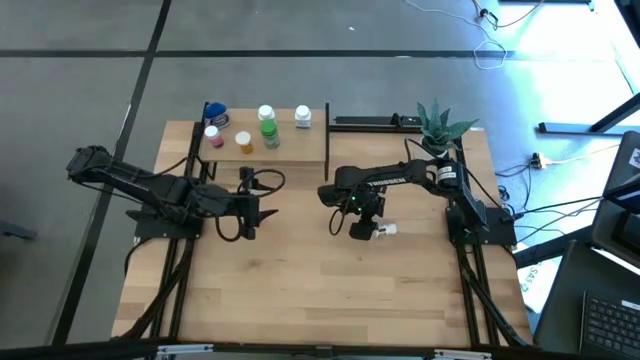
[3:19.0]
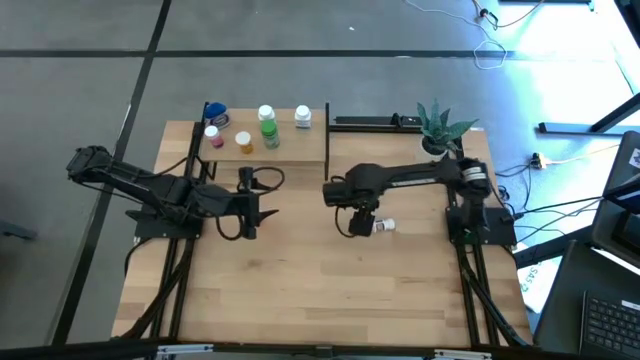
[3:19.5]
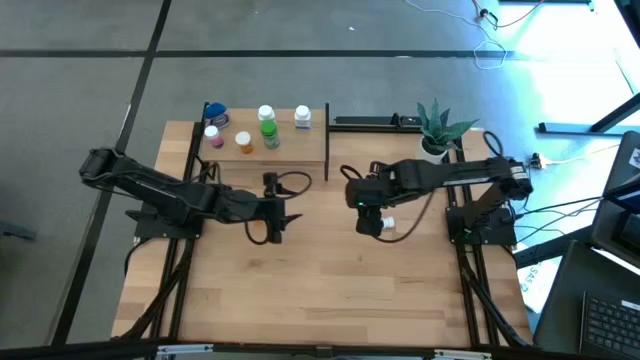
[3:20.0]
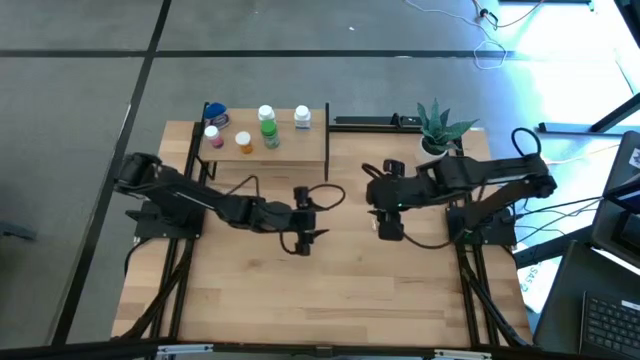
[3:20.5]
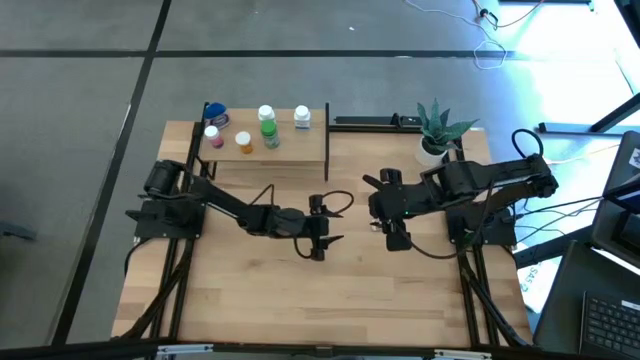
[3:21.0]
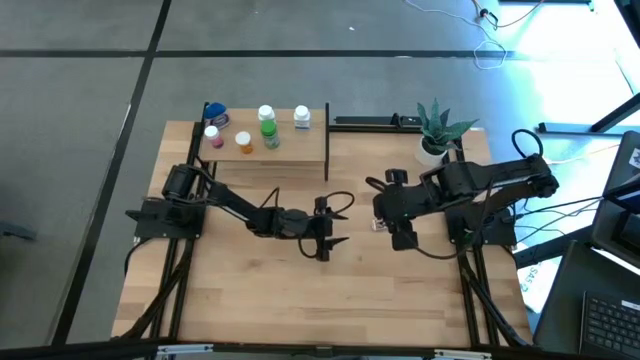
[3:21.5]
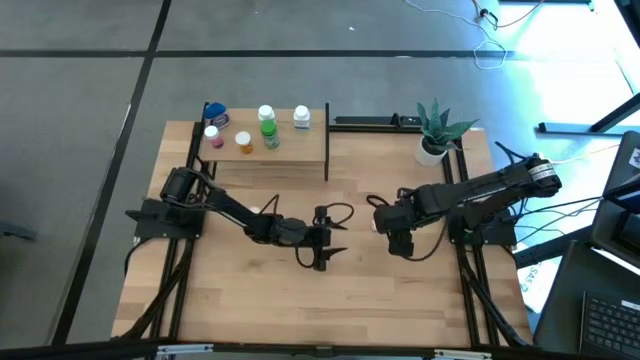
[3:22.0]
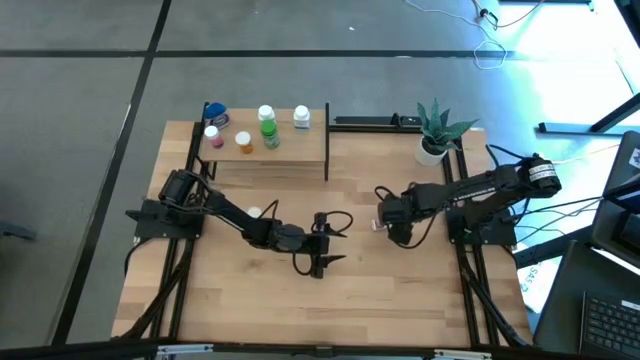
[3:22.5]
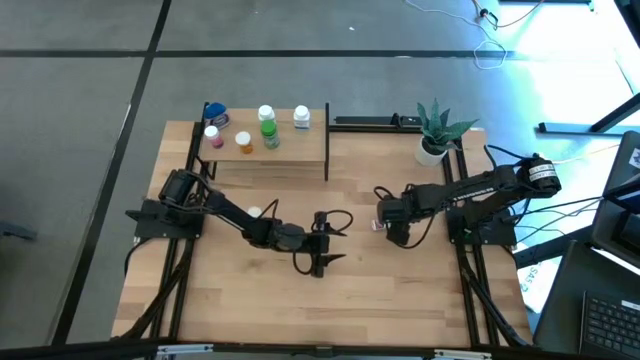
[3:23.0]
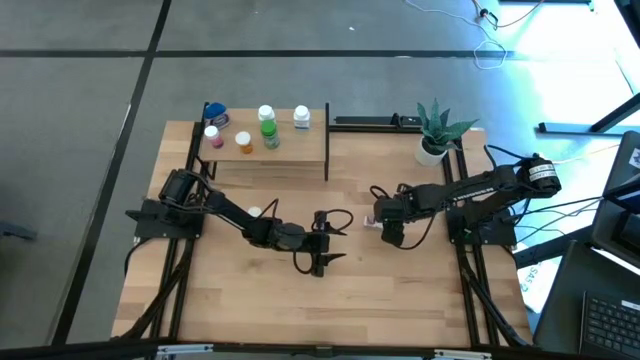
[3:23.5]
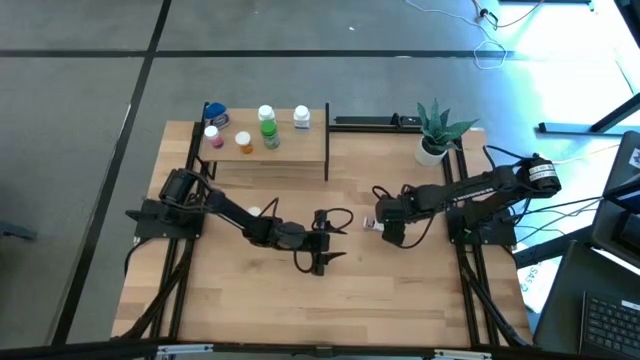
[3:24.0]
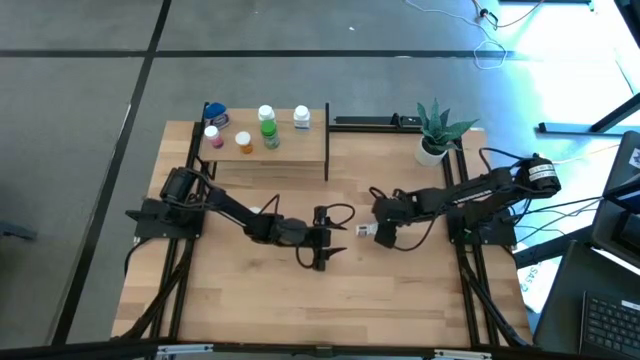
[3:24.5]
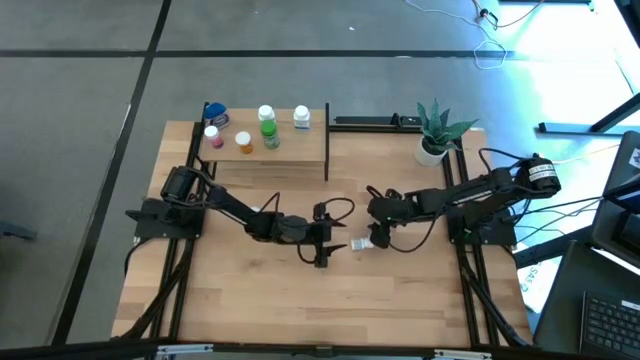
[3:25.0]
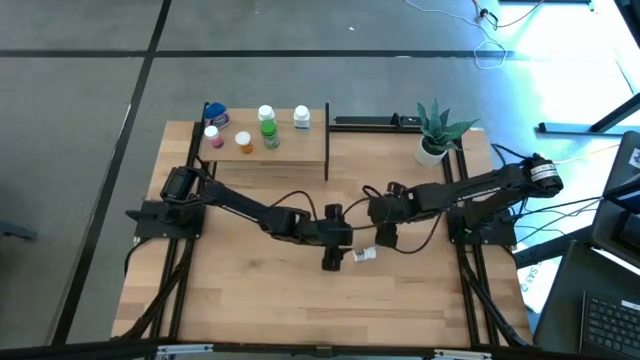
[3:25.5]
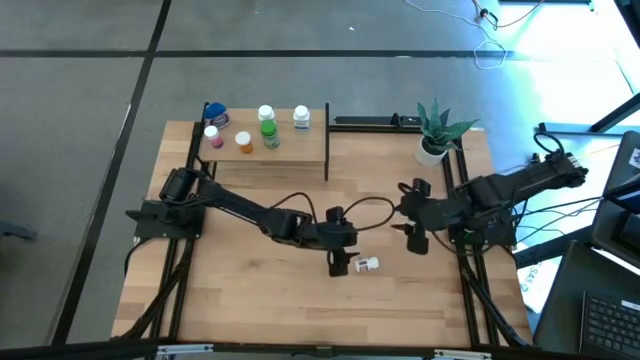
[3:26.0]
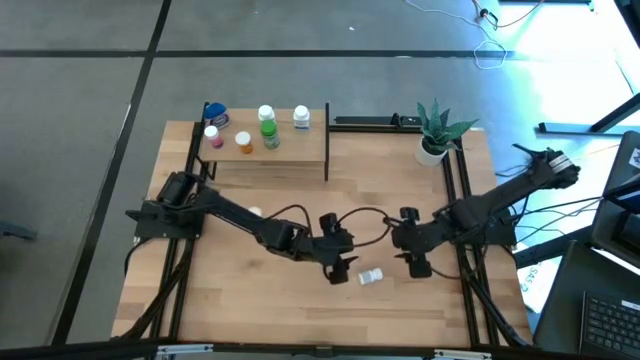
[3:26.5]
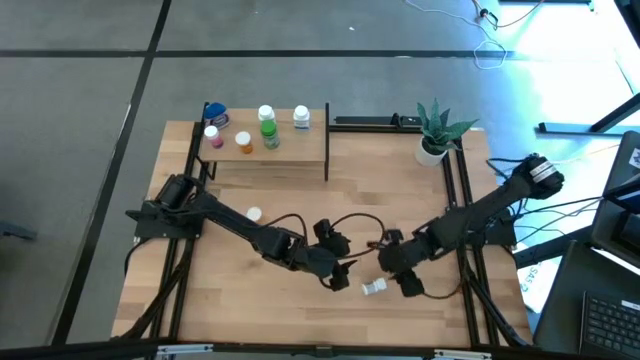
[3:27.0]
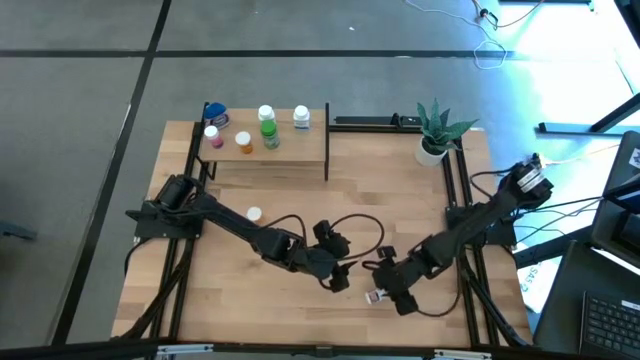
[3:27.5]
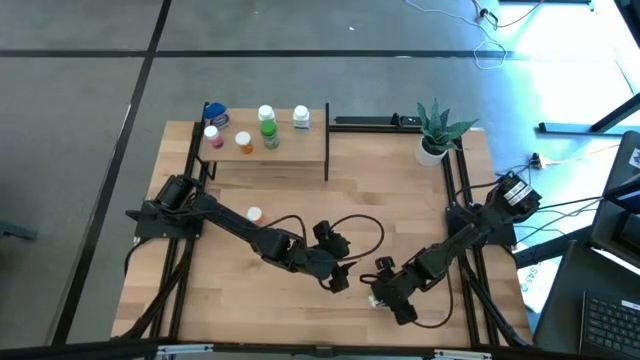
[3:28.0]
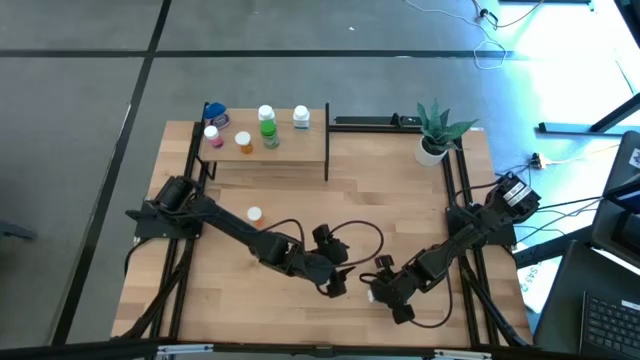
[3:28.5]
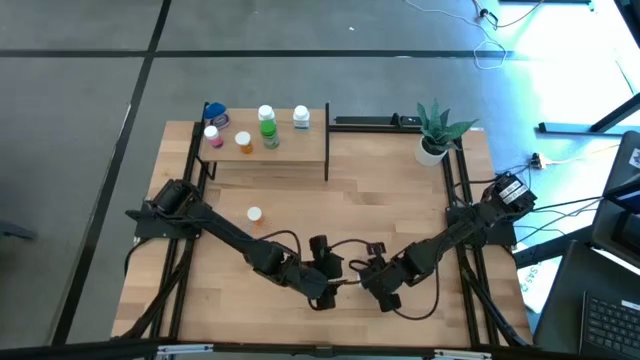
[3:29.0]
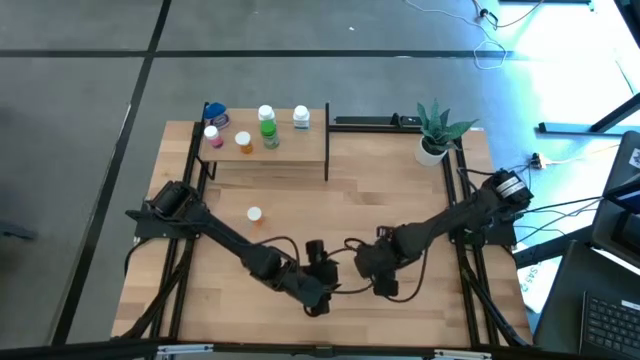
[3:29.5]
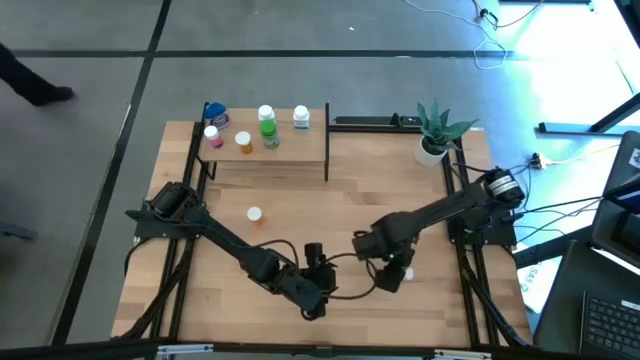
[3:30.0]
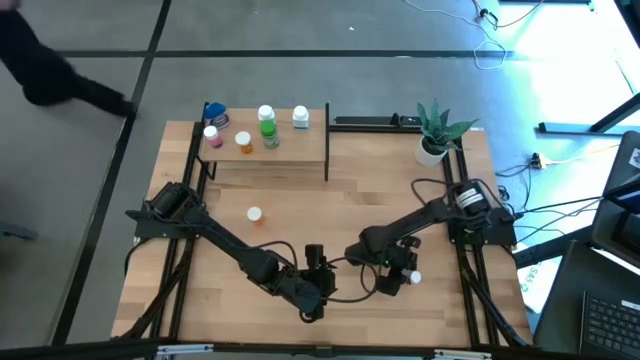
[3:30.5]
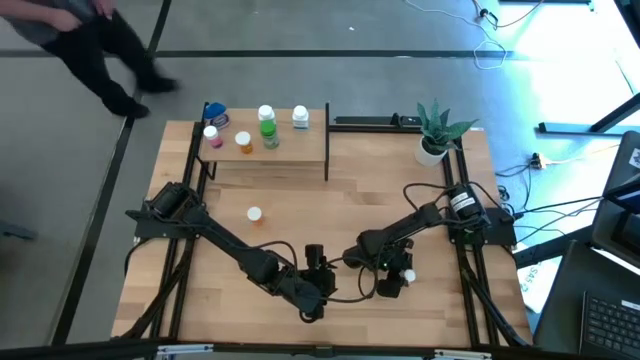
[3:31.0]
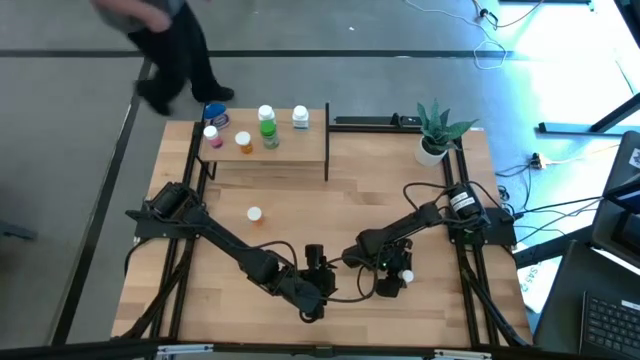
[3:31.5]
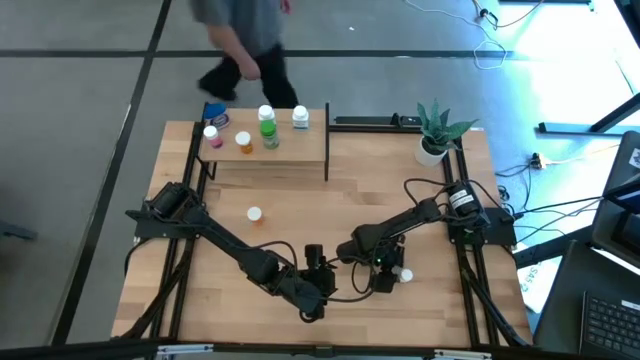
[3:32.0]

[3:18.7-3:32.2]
Task: Pick and place medicine bottles onto shelf by color
Adjust the white pill bottle on the table

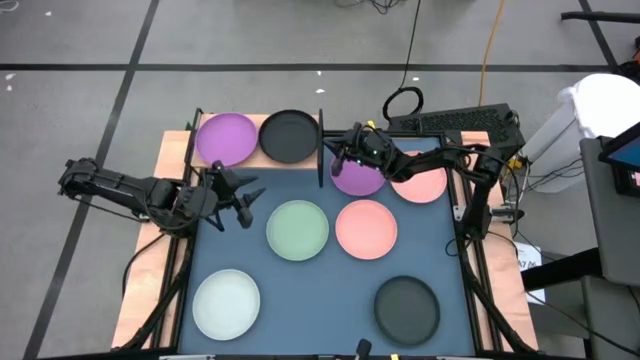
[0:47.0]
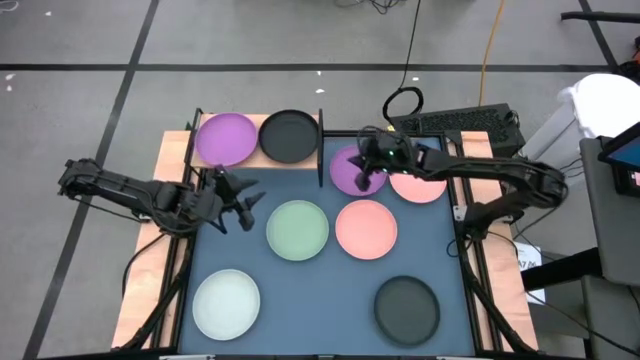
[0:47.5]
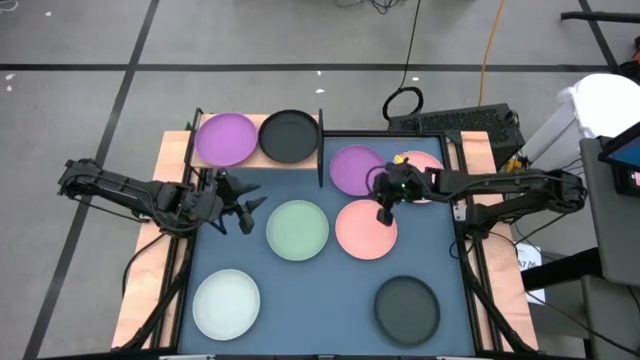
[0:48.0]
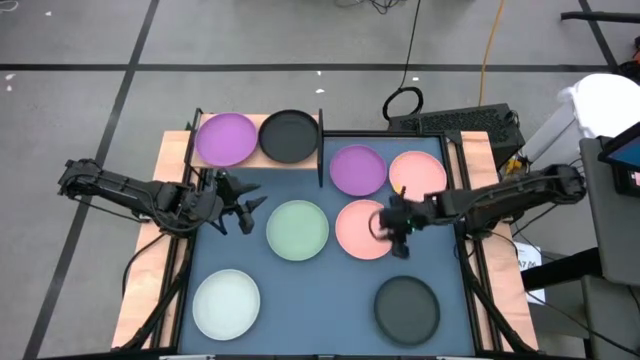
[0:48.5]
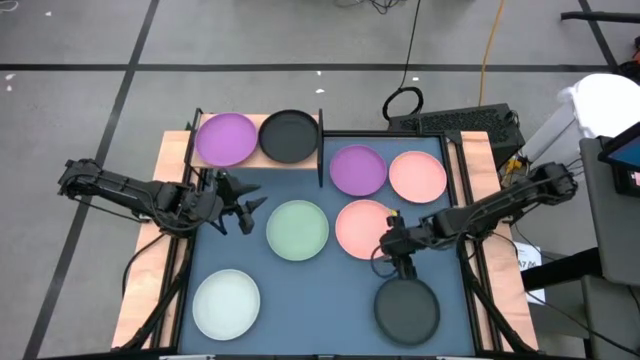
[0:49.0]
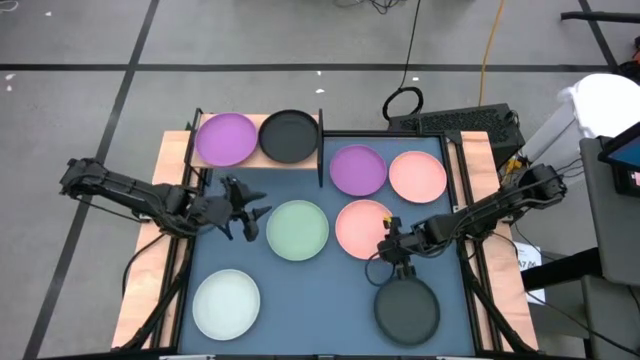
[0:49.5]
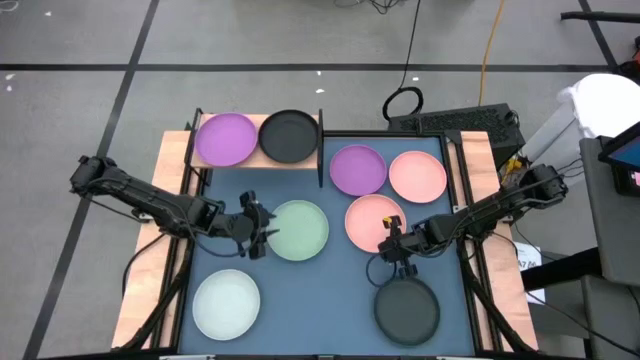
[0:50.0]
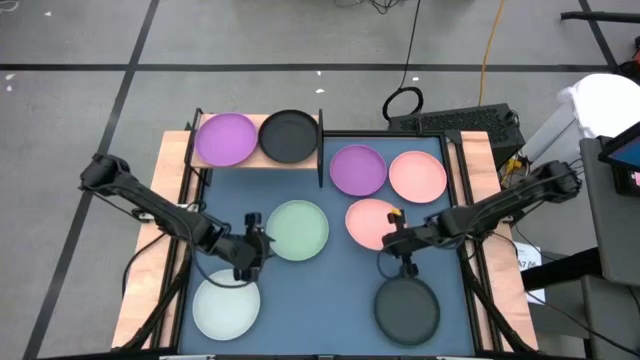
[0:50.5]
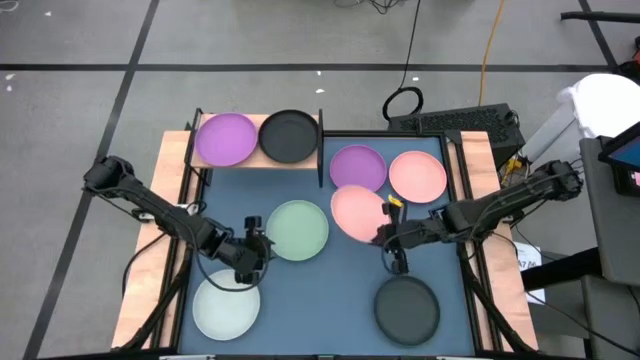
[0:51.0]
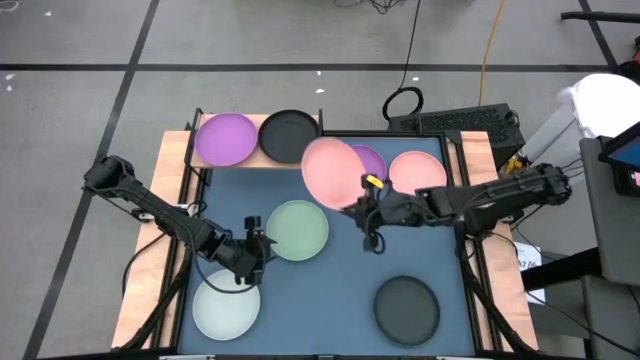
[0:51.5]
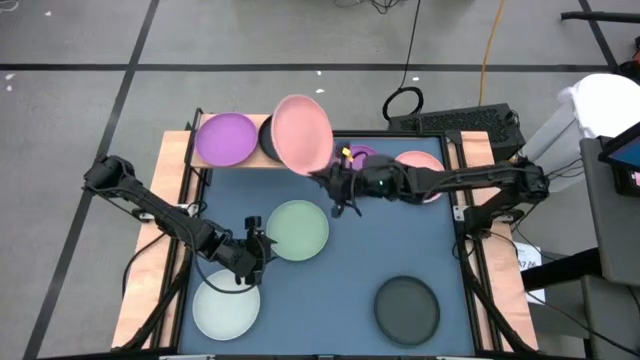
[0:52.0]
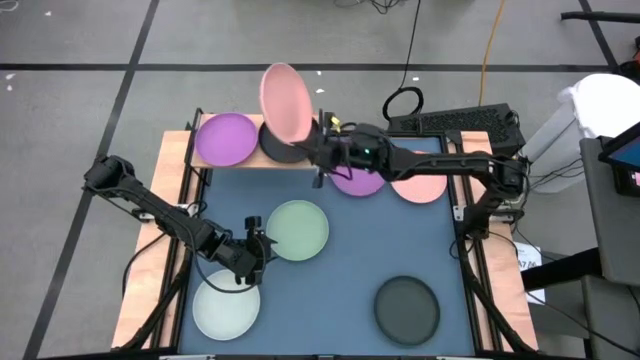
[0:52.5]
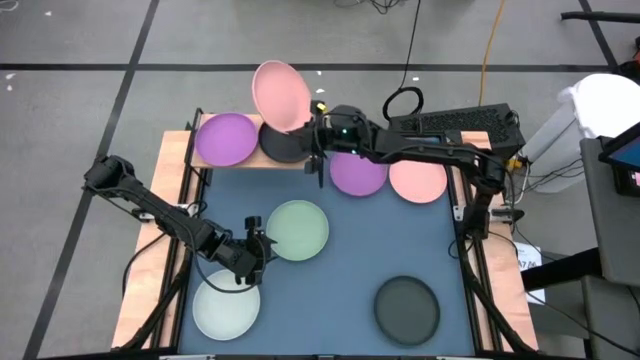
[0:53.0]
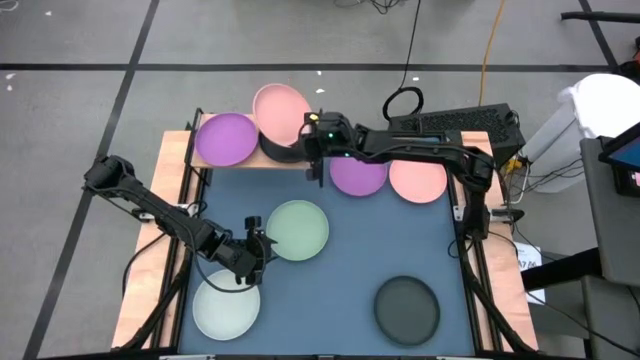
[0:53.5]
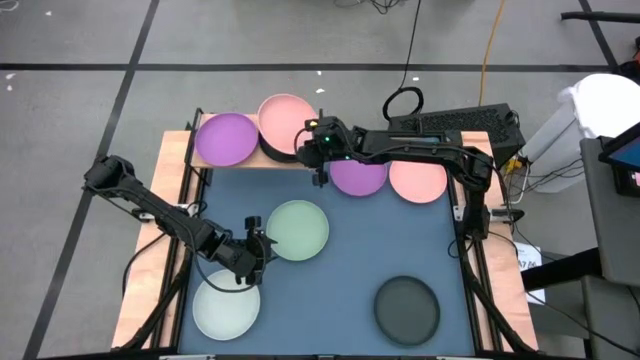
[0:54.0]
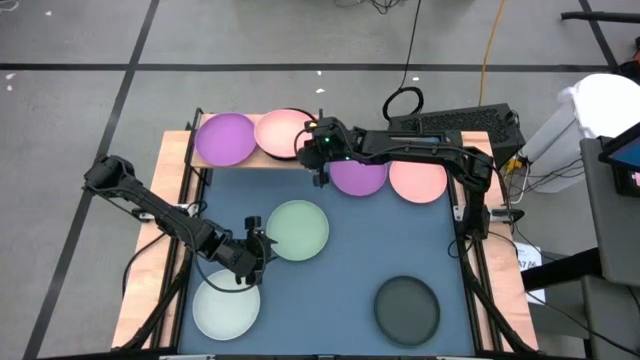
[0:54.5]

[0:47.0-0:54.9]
Task: Place and stack plates onto a shelf
Stack the bottom light pink plate on the black plate on the shelf
